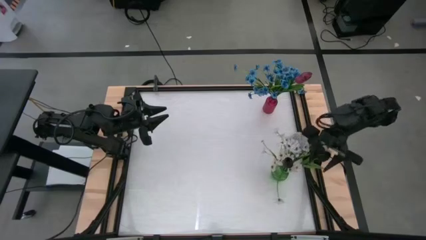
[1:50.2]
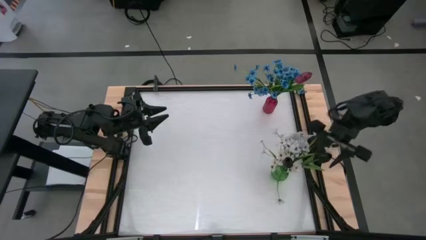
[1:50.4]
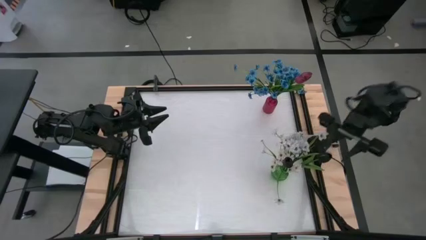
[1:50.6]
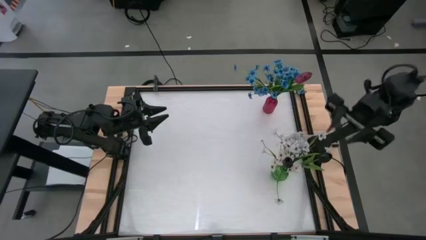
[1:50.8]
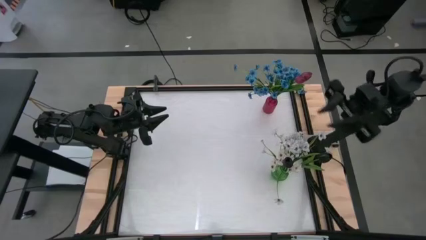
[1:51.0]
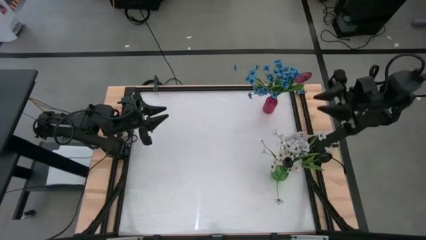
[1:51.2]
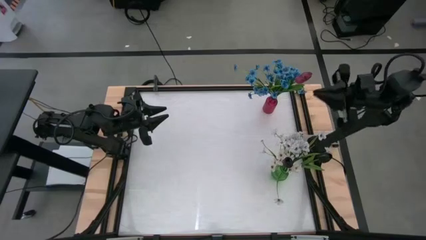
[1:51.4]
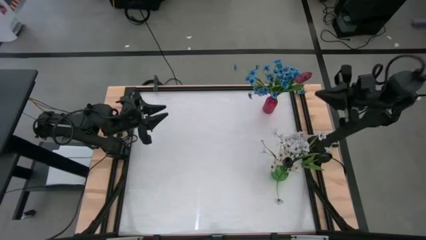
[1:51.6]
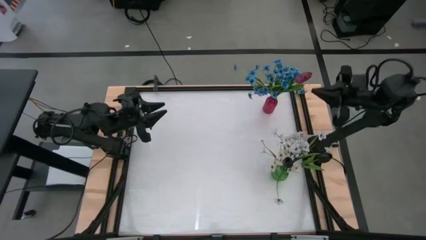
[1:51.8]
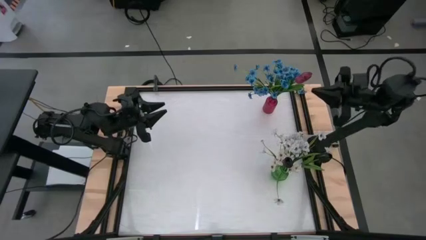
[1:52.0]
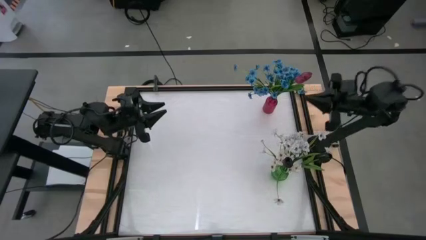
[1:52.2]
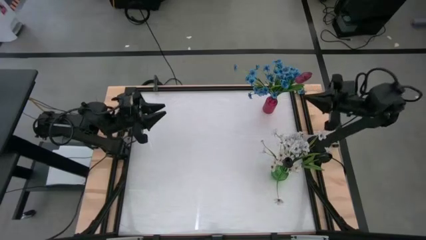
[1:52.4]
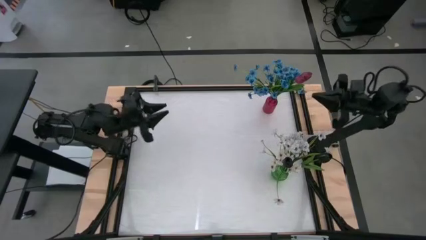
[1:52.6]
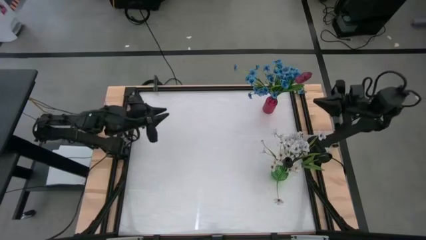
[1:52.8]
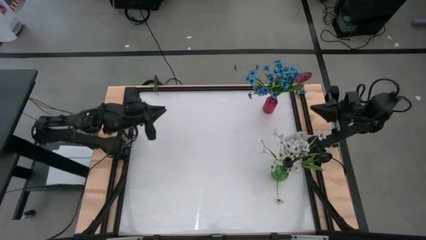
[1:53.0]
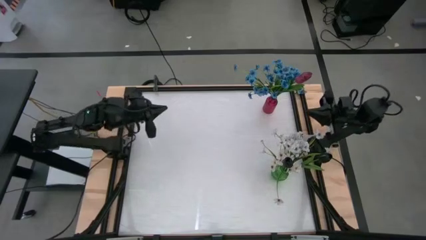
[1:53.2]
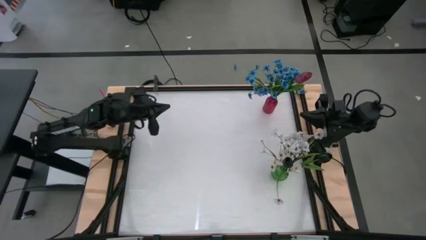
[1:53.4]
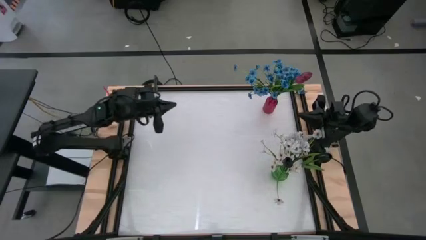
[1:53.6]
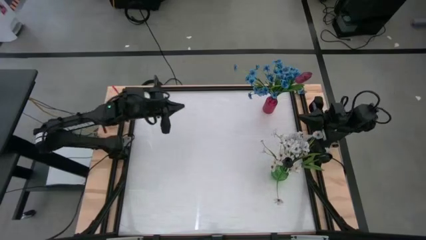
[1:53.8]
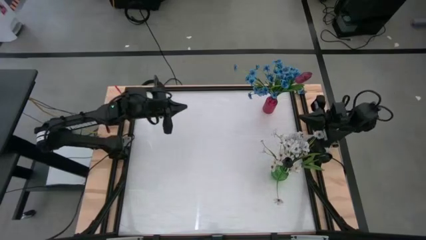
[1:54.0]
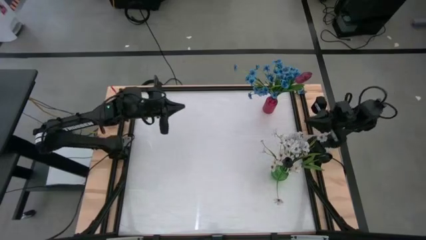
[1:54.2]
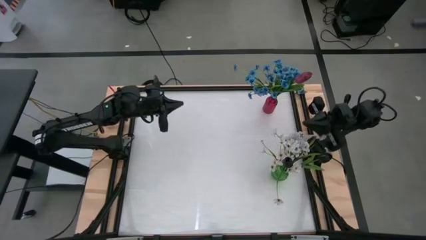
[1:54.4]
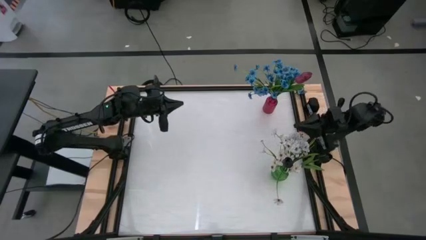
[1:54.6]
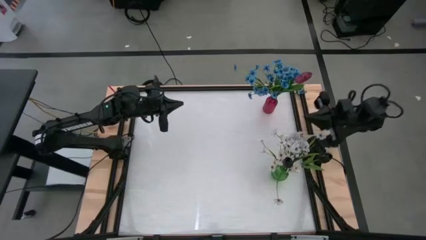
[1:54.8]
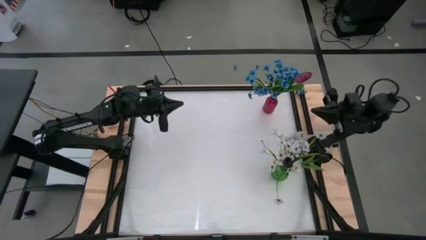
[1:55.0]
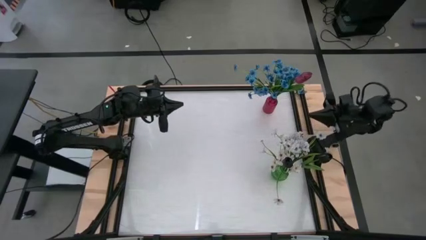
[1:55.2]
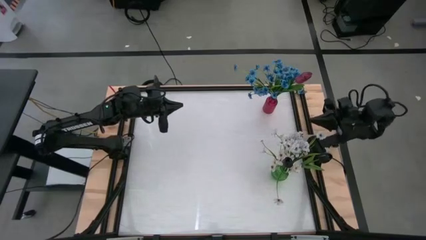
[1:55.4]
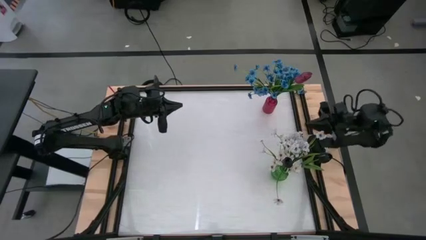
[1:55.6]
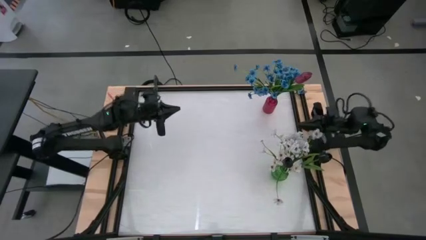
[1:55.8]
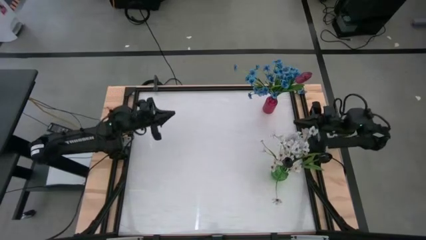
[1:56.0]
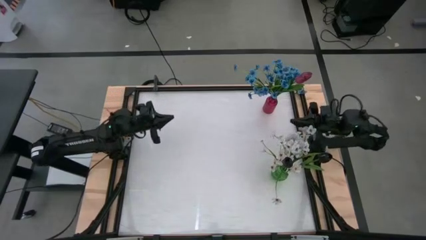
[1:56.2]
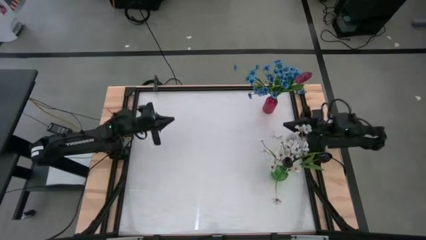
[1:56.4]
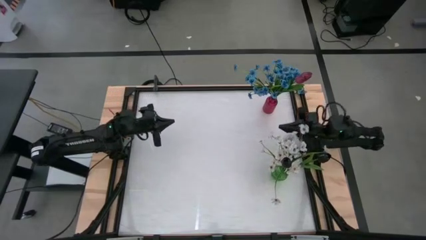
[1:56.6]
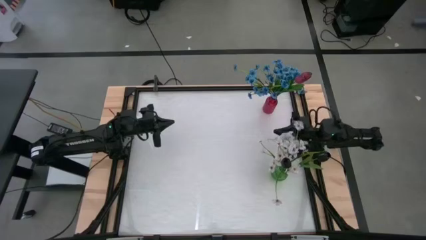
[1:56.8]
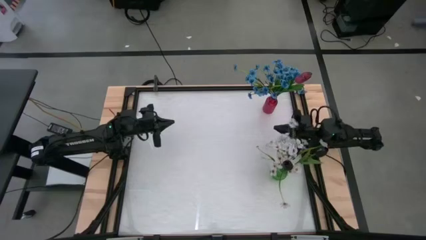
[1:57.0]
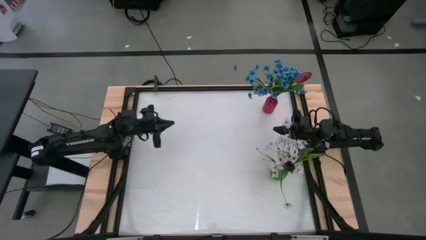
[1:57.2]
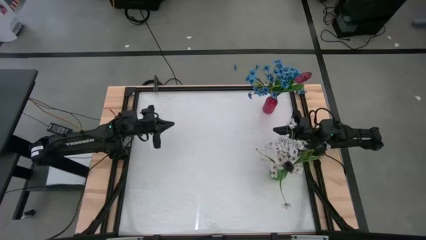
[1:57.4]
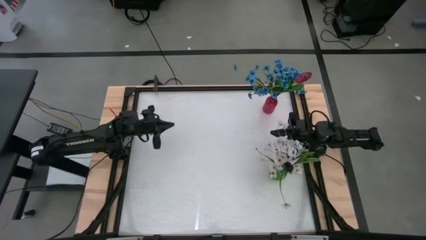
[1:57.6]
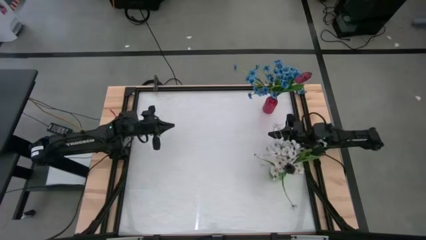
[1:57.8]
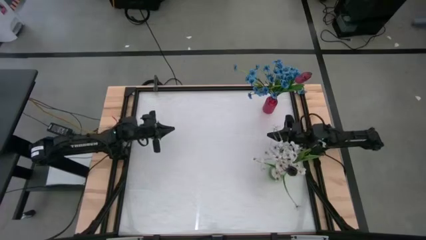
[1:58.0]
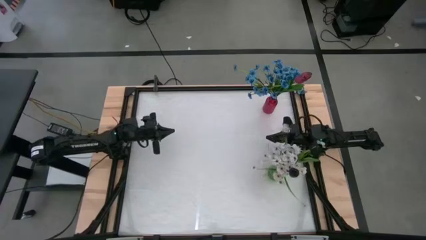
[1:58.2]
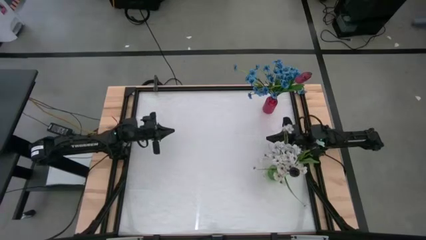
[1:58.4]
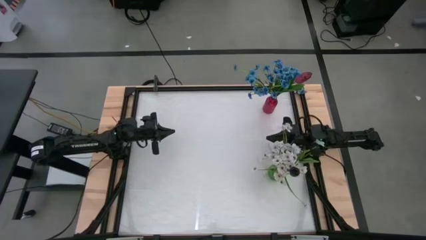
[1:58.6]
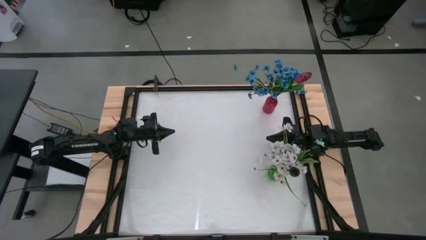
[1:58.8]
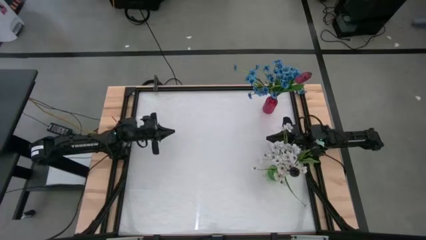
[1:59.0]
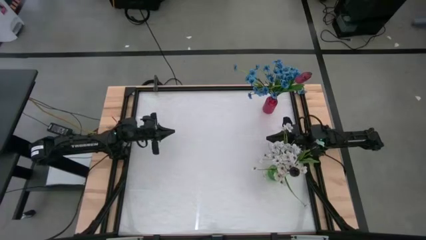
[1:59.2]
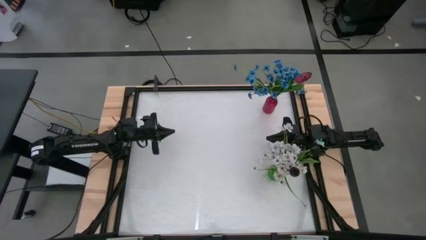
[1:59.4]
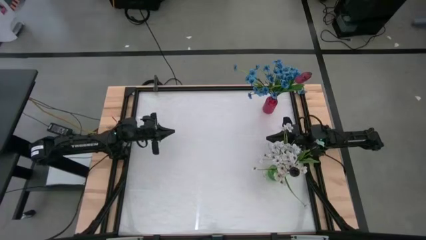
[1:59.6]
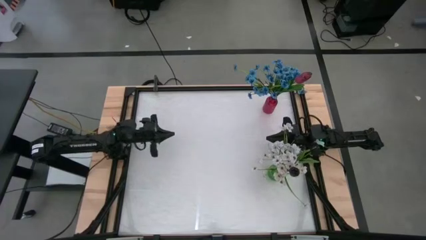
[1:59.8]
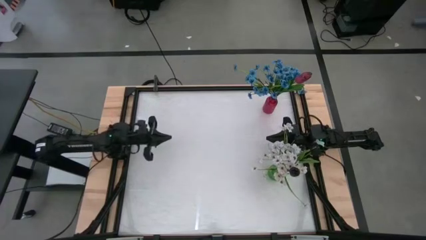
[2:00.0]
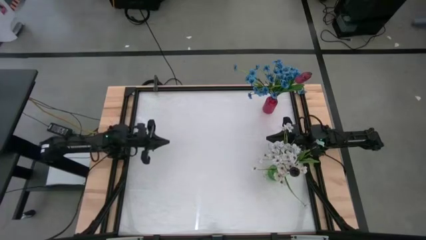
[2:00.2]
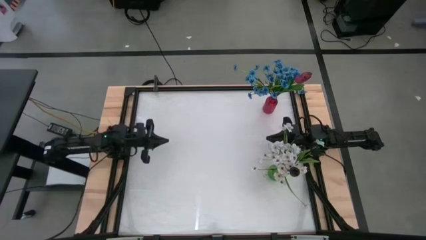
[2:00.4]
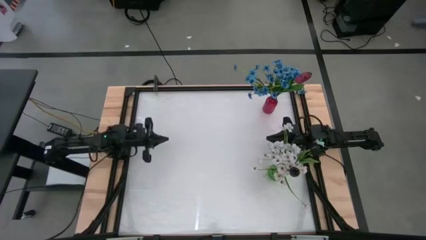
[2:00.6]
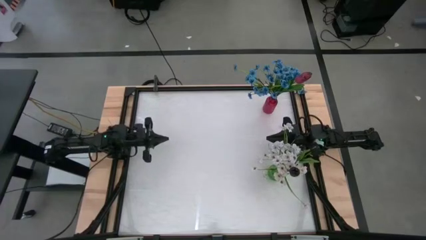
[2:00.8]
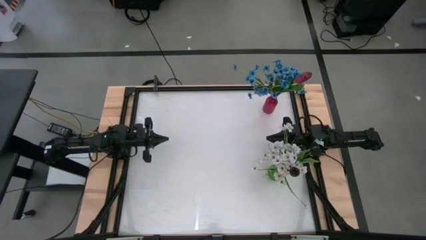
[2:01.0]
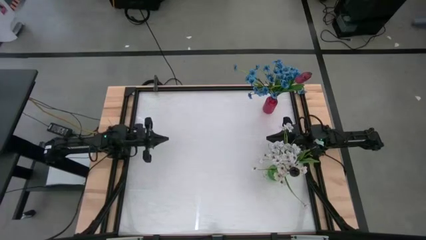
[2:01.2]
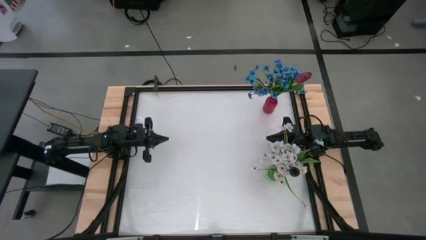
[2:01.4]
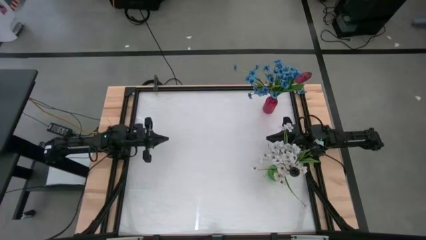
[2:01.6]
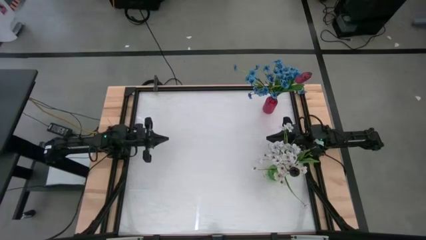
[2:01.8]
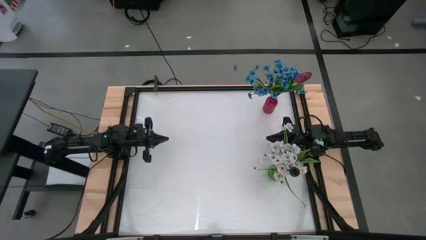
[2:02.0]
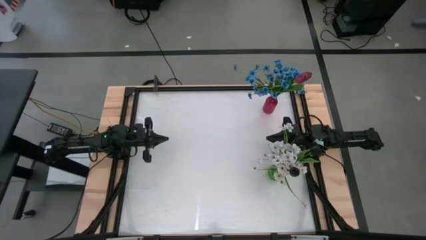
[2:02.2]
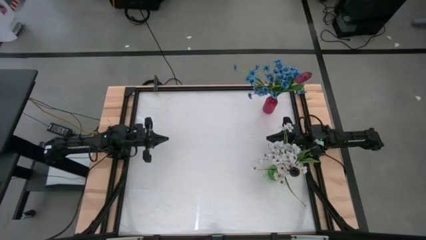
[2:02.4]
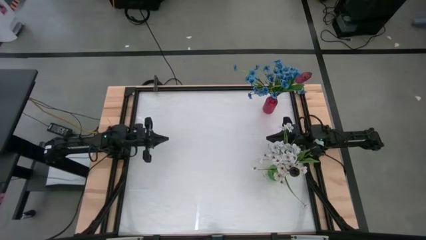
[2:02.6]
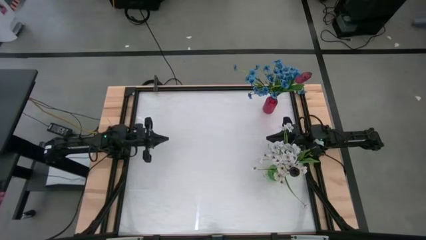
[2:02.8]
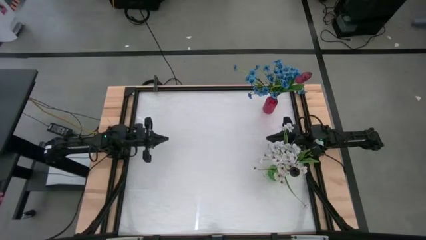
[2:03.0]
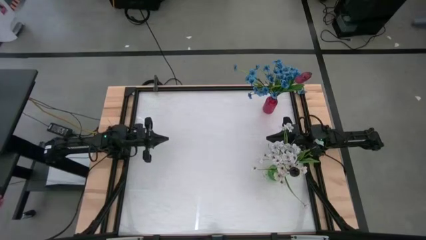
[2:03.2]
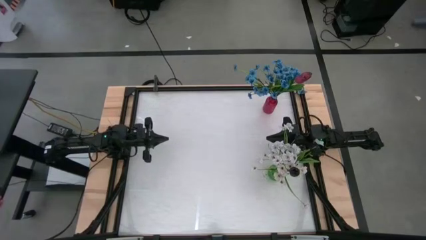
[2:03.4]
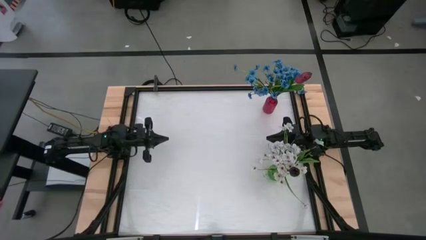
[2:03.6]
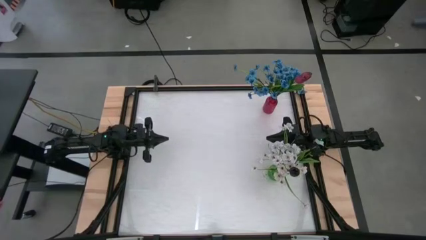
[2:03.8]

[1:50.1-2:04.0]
Task: Sort flowers into vase by color
Return to Home Position

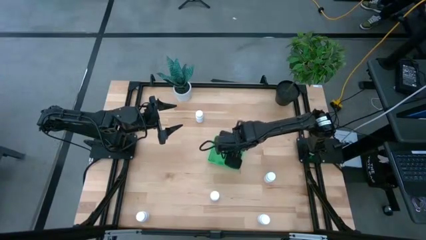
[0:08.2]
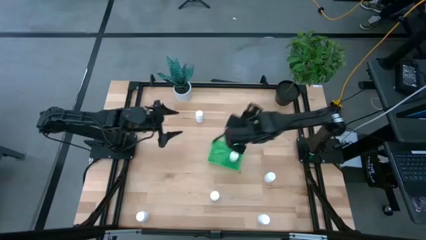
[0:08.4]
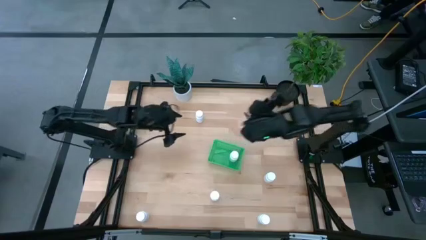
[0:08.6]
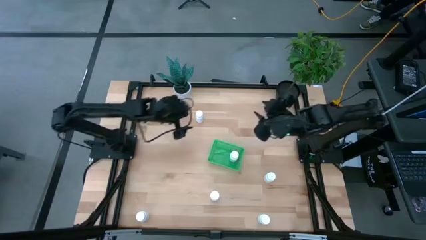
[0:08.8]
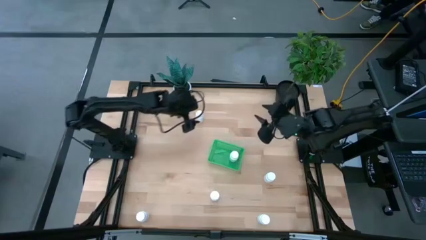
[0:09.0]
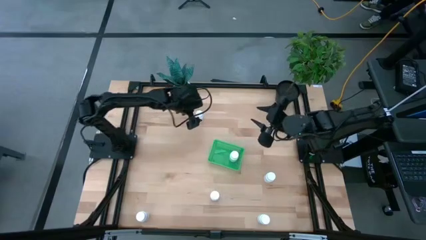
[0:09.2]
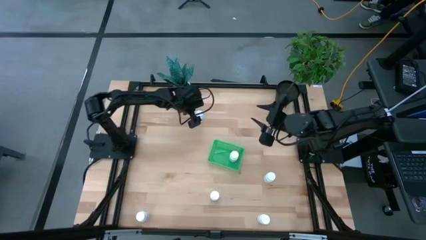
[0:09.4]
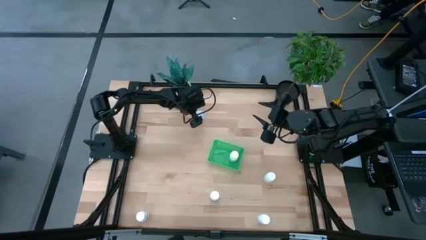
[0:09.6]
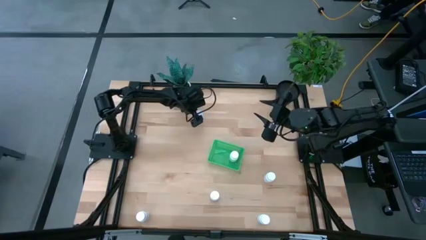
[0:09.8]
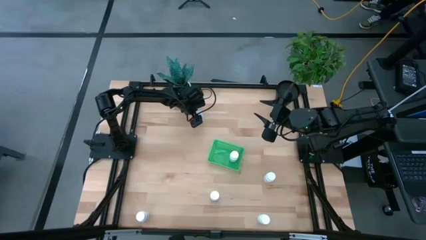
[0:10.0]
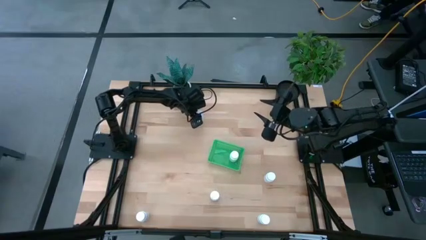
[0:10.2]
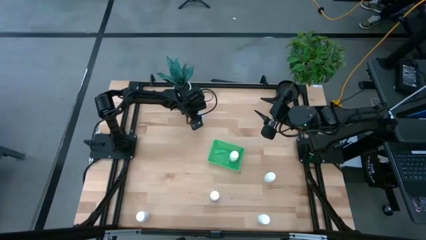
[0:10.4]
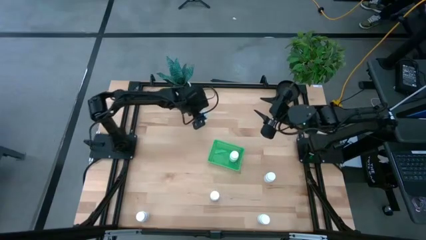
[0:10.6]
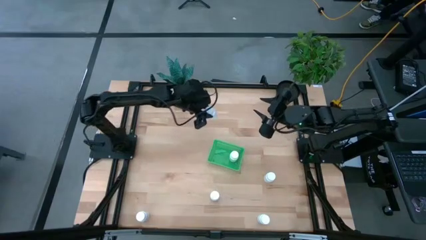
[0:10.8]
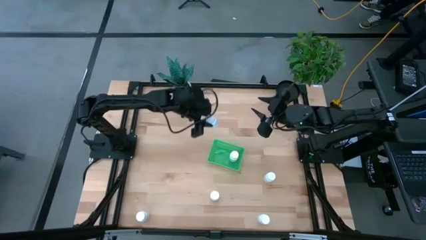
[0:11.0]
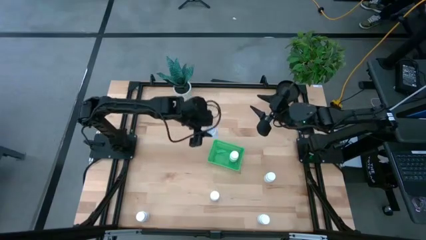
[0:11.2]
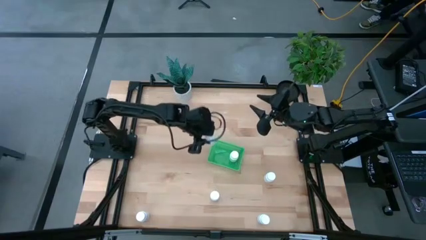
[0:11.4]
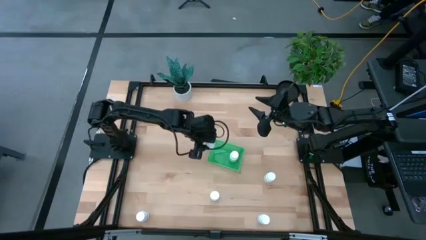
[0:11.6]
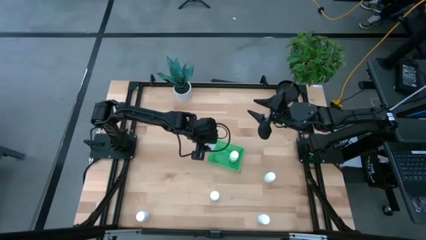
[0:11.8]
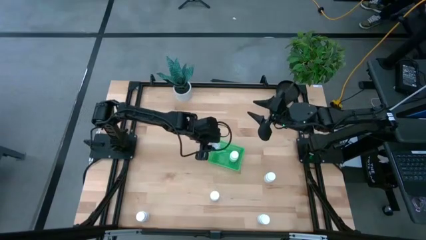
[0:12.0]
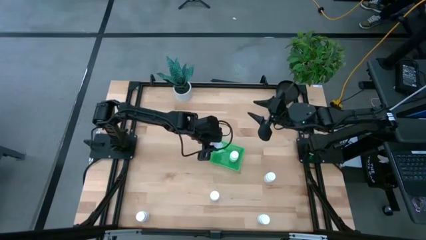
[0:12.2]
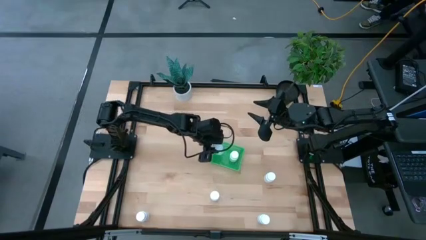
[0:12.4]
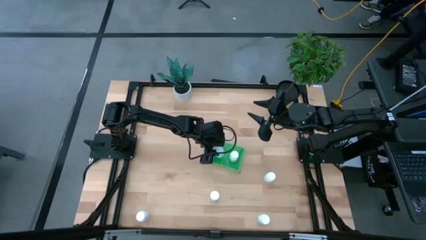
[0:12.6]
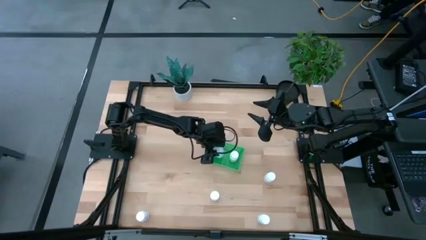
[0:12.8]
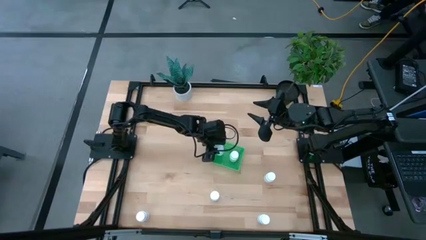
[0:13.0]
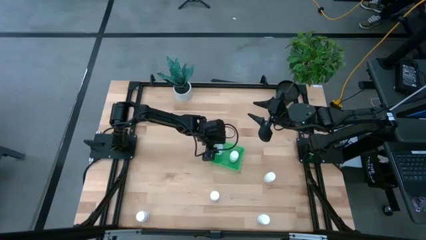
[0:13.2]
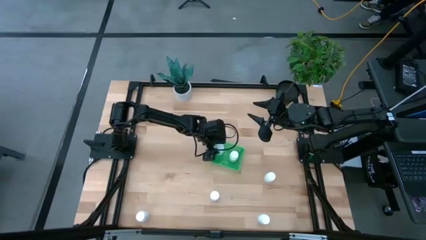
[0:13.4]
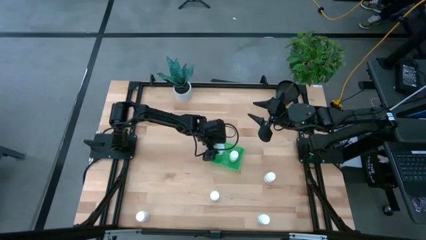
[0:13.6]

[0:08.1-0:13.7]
Task: Pick and place pill bottles into a basket
Put the white pill bottle into the green bin
